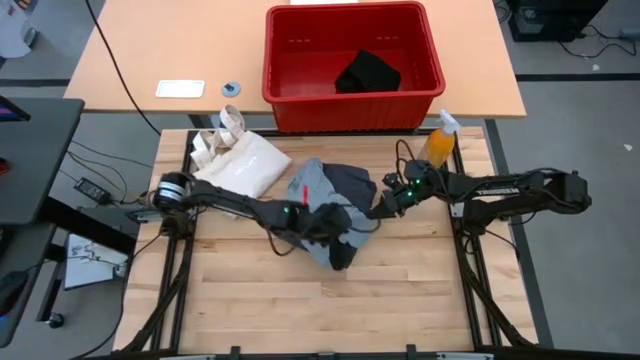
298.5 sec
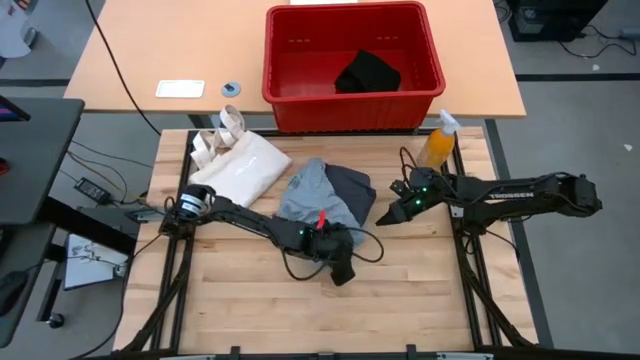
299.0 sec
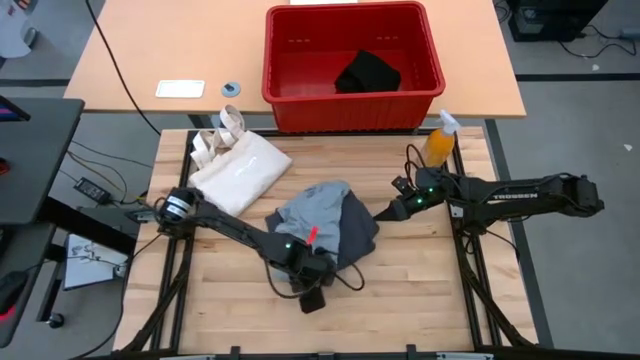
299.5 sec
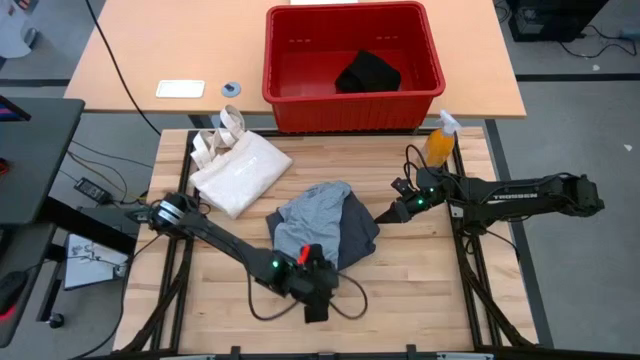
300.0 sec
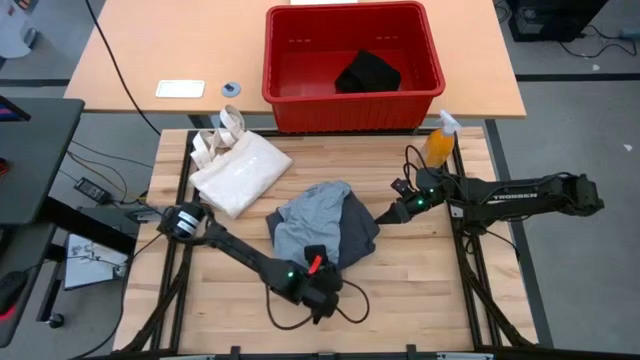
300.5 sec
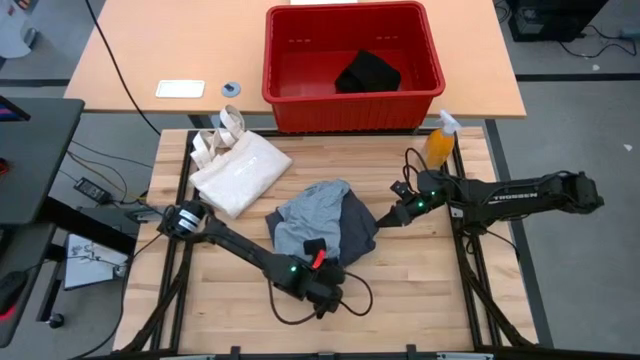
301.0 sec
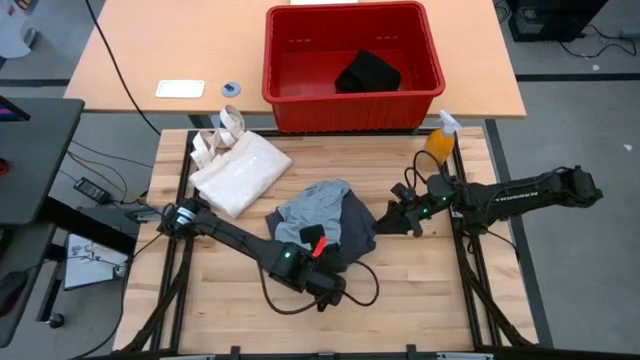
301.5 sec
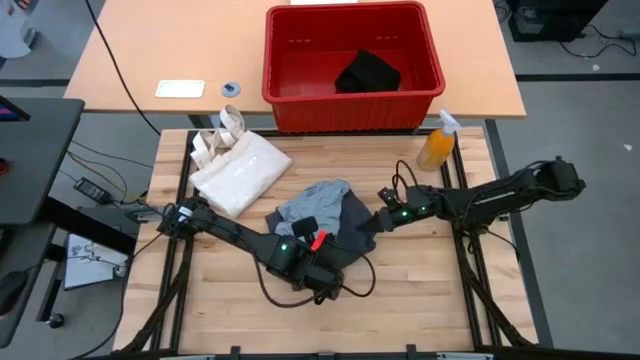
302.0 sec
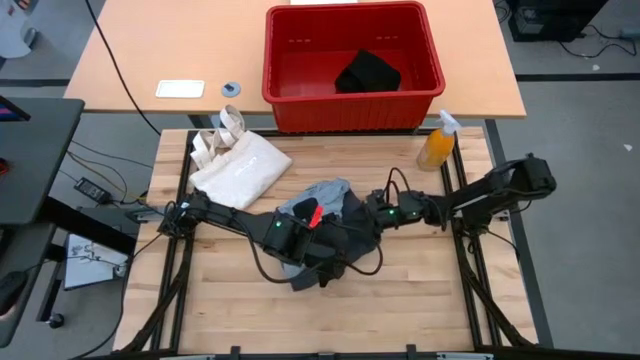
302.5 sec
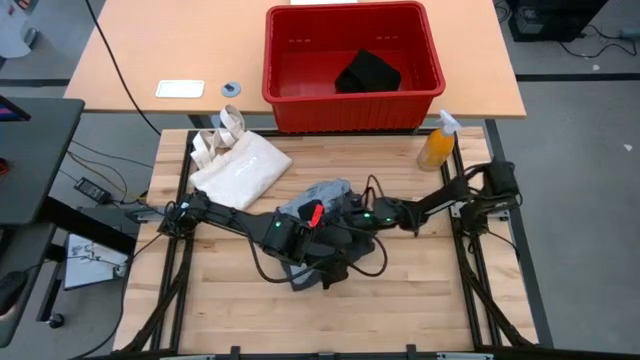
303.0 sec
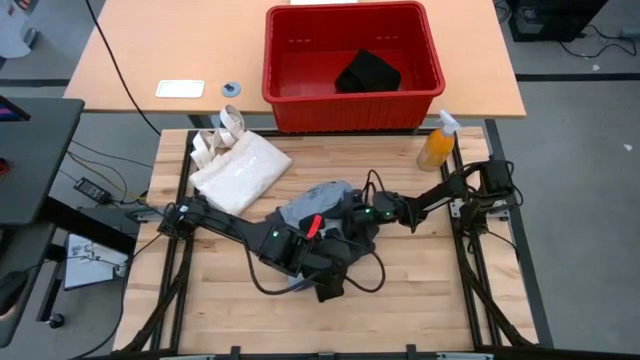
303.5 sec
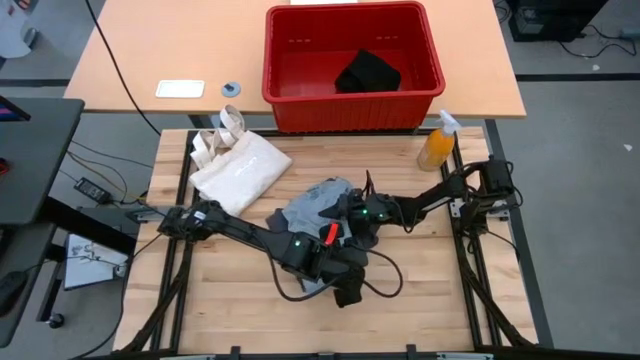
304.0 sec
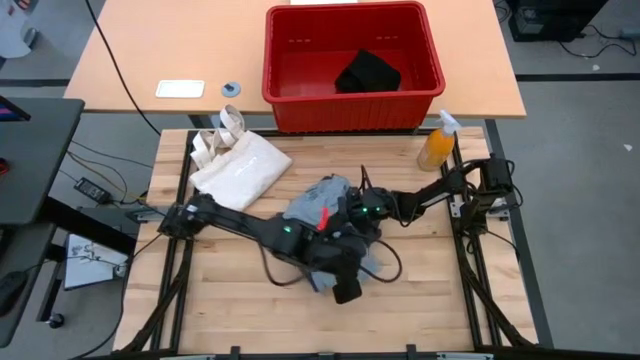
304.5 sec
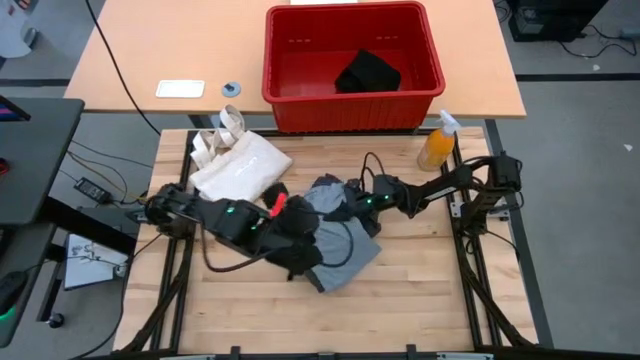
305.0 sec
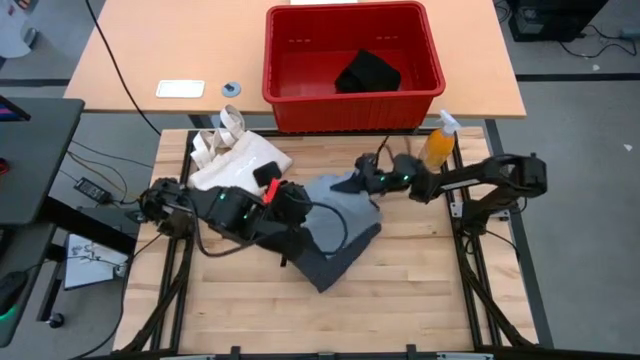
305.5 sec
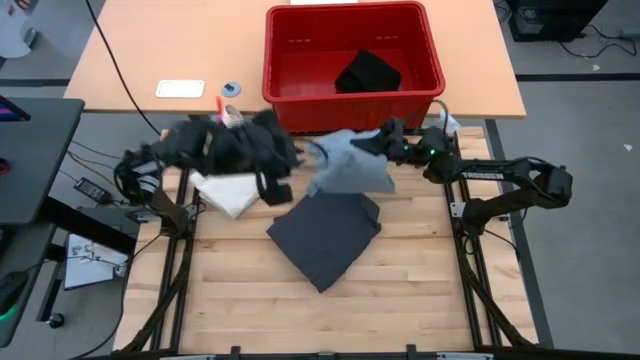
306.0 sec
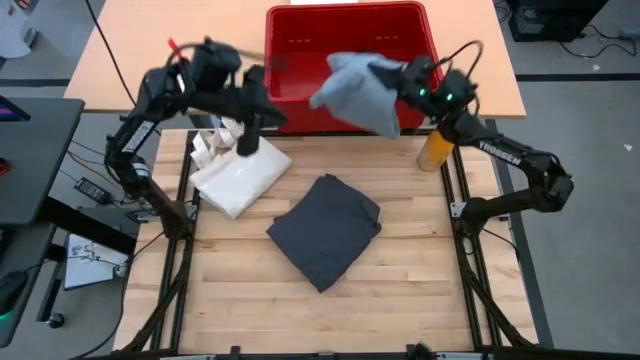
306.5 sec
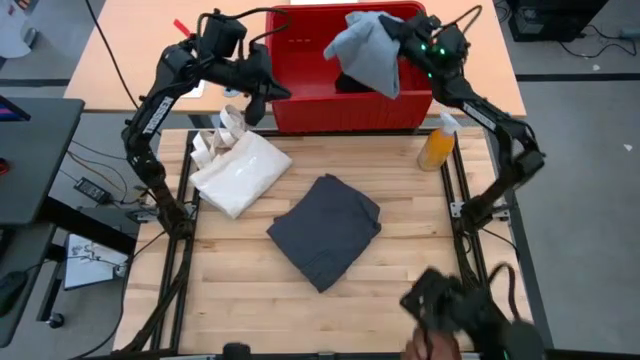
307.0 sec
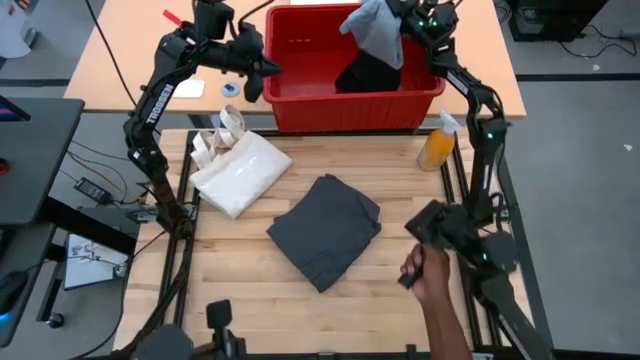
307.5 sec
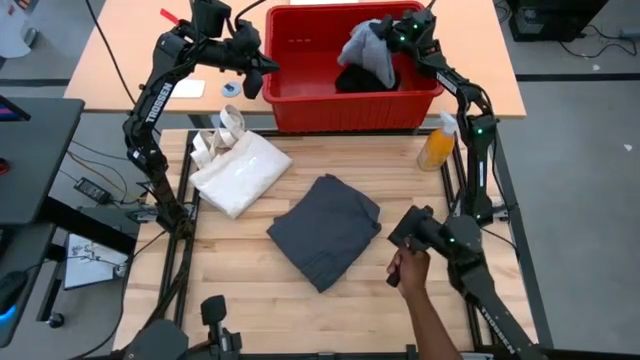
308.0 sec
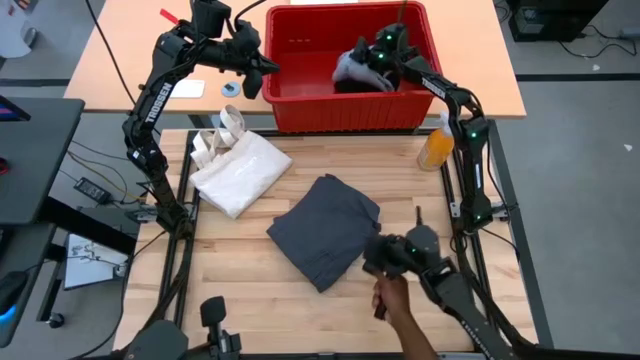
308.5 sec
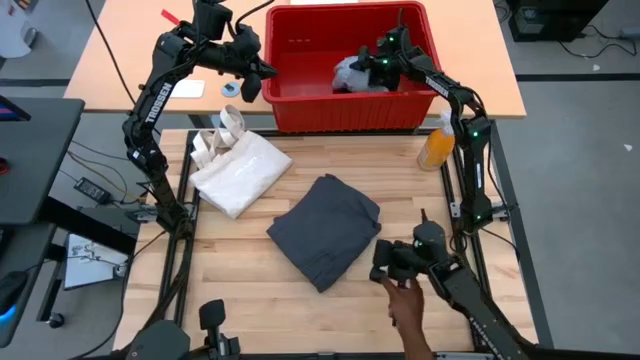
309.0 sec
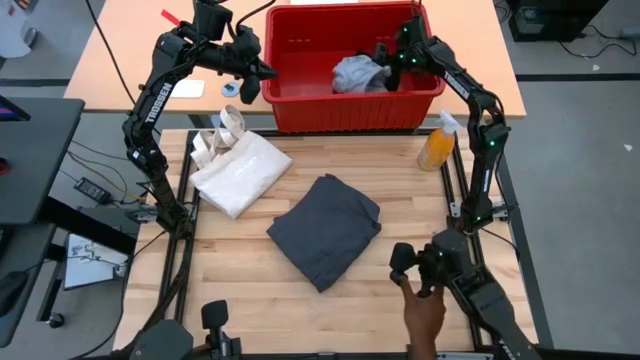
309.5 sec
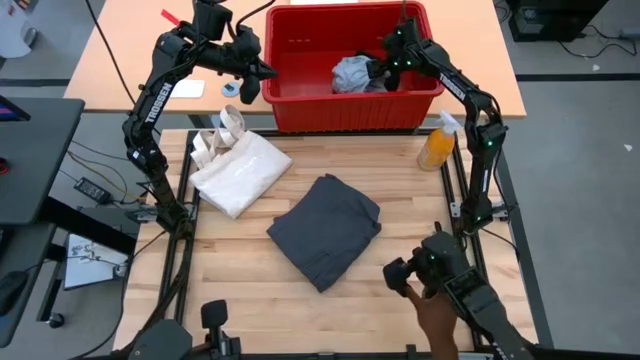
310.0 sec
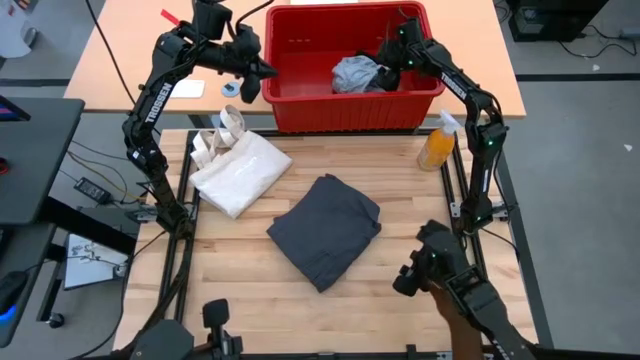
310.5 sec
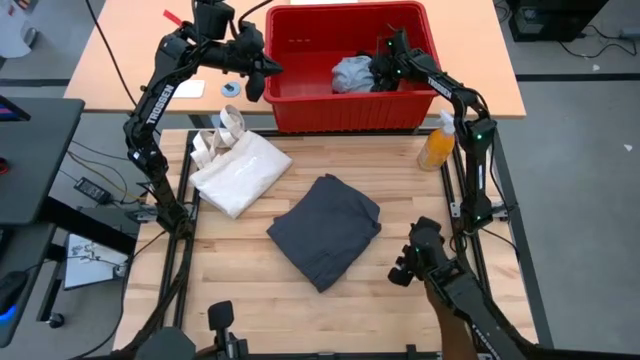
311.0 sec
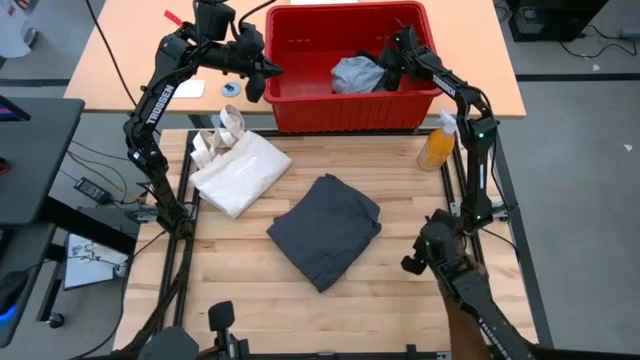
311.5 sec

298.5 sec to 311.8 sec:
Task: Fold Laundry from Bin
Put the light gray t-shirt into the red organizer bin

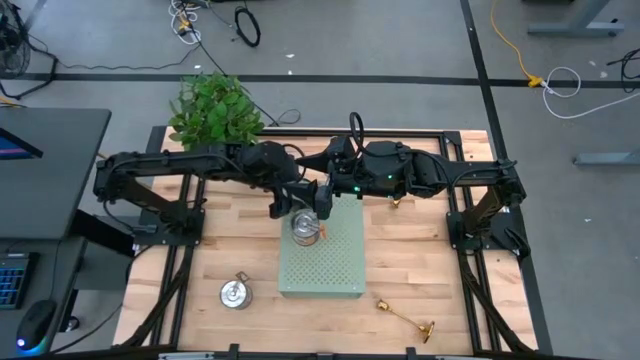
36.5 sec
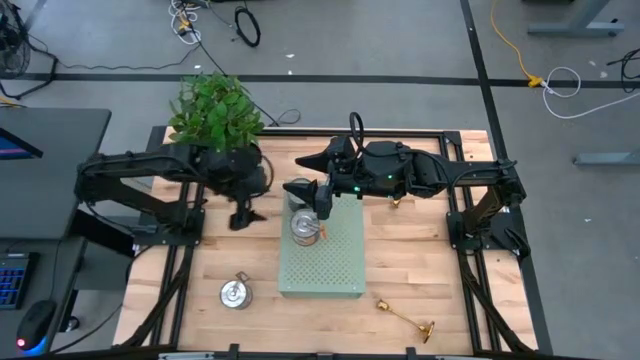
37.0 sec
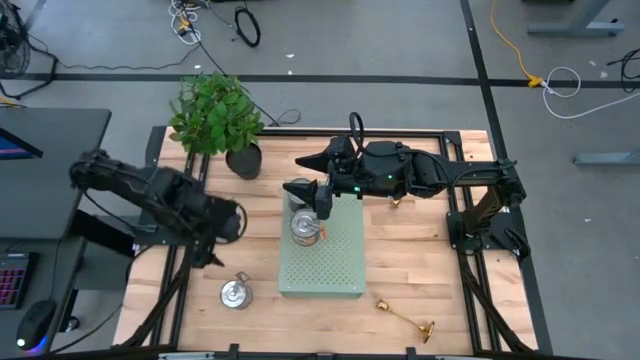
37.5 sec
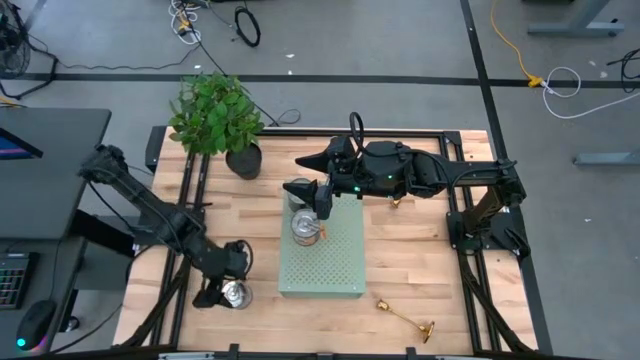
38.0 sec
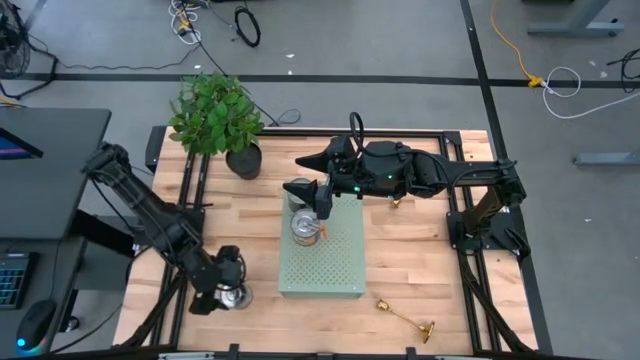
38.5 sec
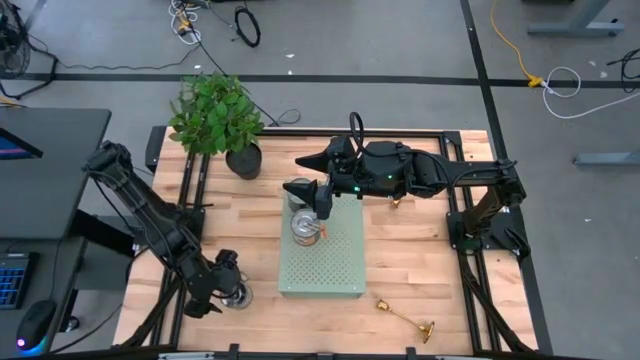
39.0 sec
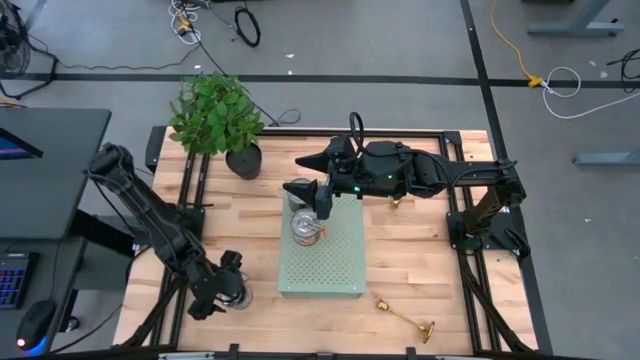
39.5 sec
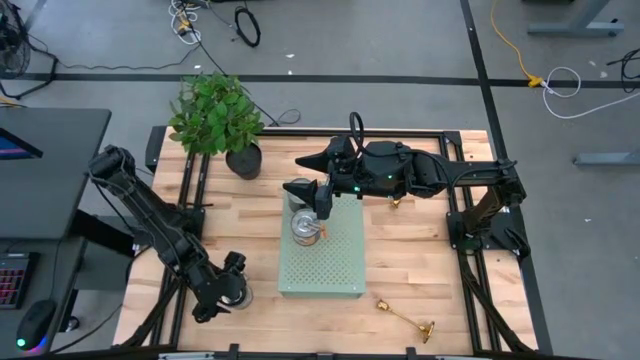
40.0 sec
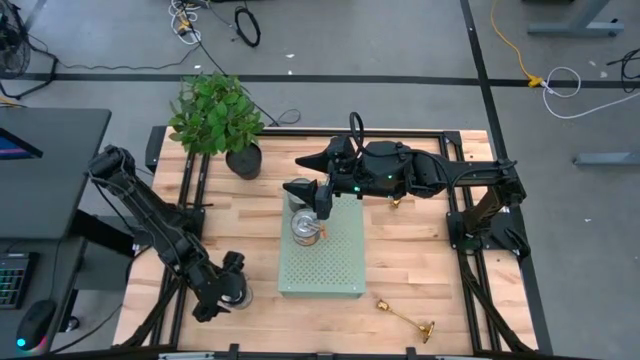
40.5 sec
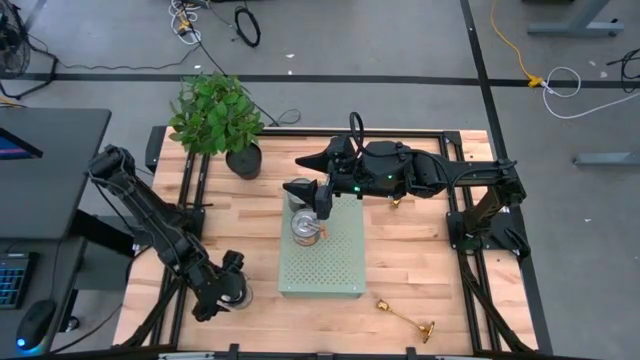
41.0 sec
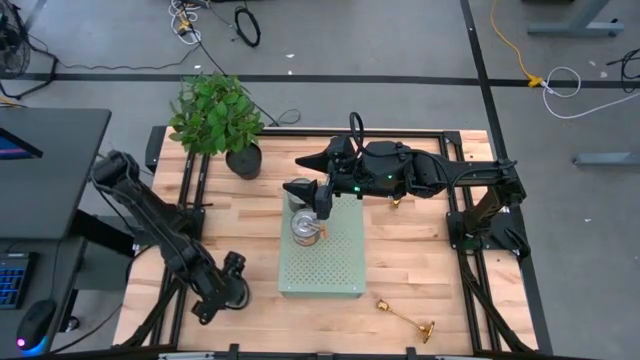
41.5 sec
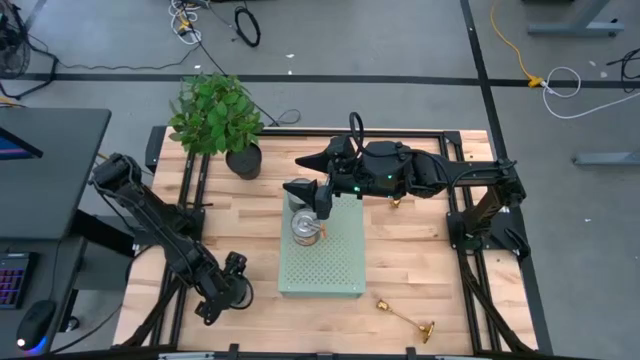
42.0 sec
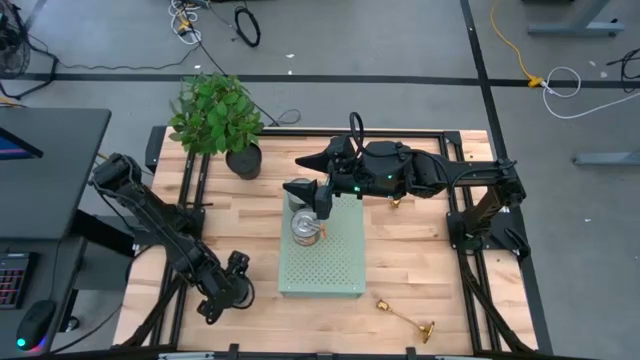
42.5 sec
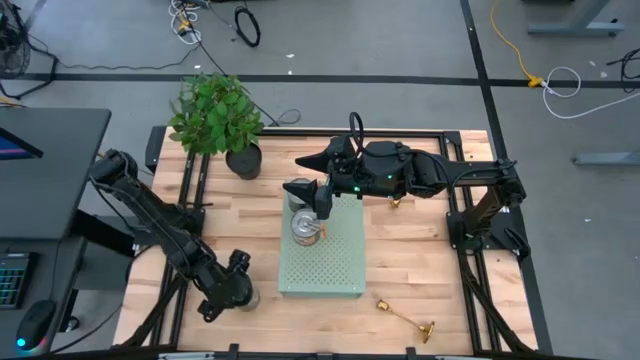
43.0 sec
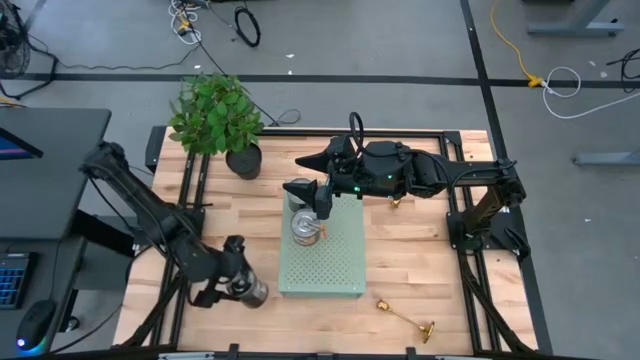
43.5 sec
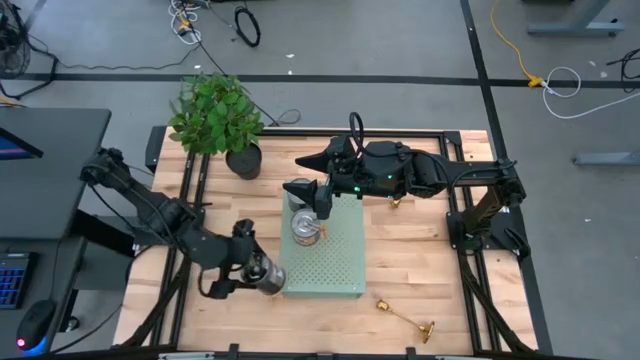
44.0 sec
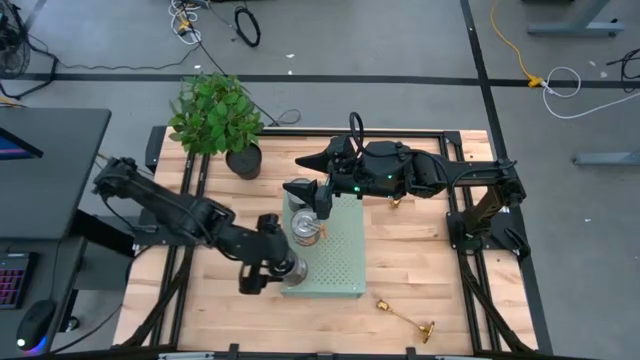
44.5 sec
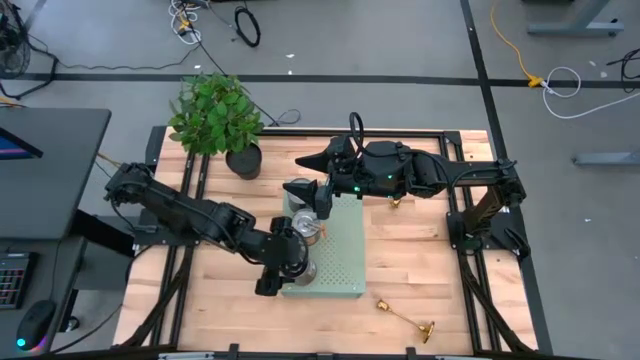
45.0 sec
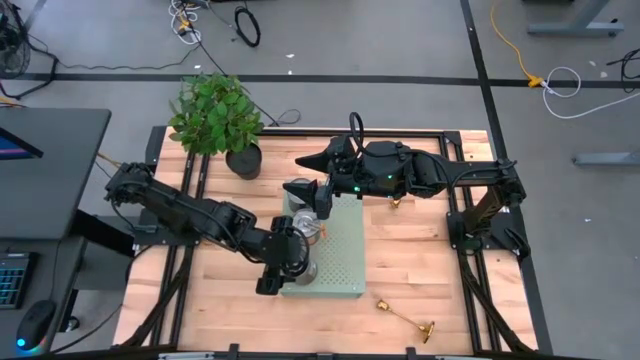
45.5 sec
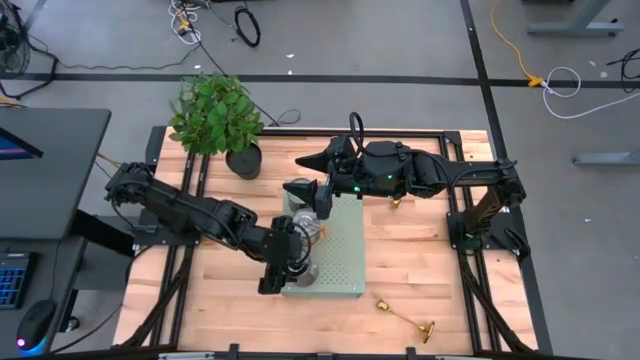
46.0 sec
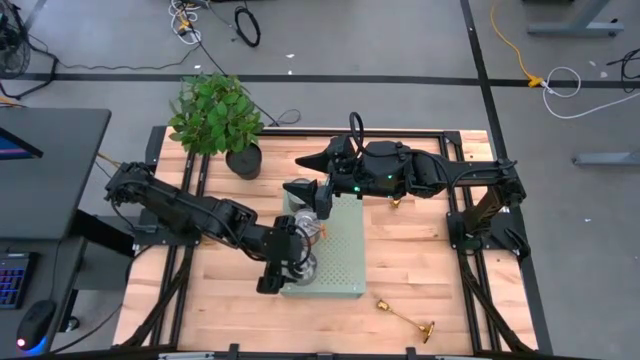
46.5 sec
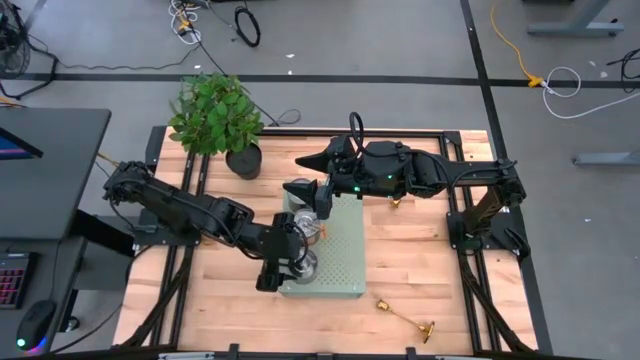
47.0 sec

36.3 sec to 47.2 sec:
Task: Pick & Place candle stick holders
Put the brown scented candle on the shelf
